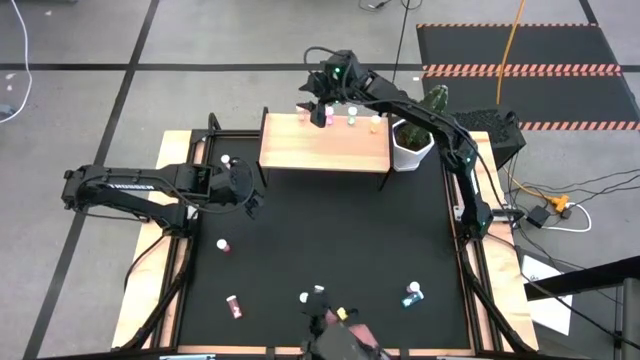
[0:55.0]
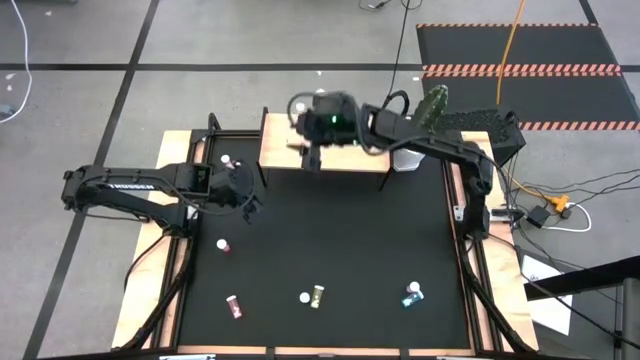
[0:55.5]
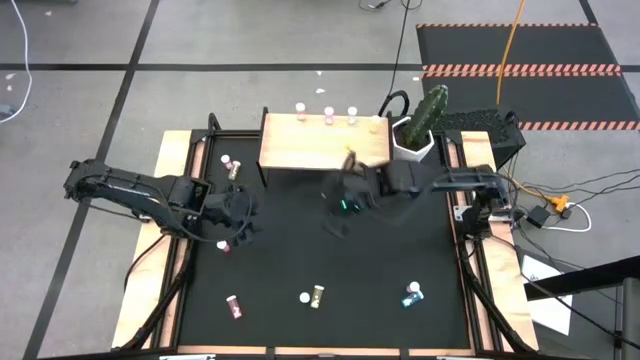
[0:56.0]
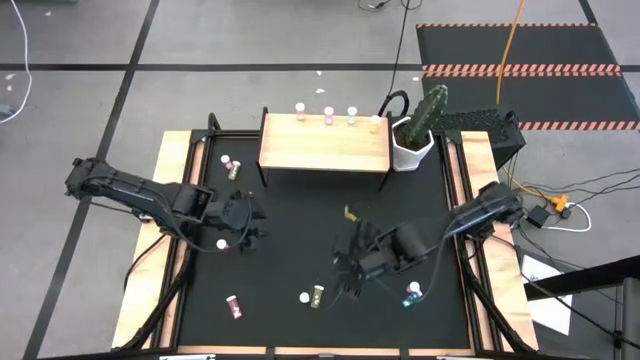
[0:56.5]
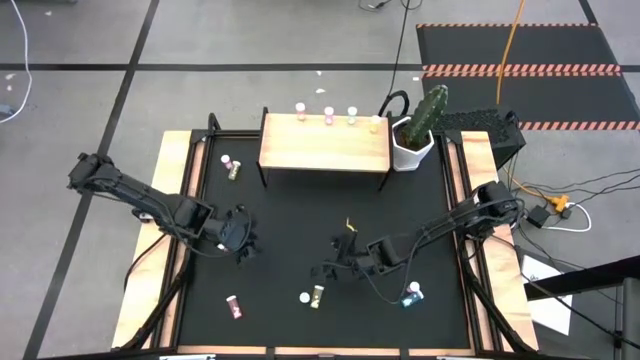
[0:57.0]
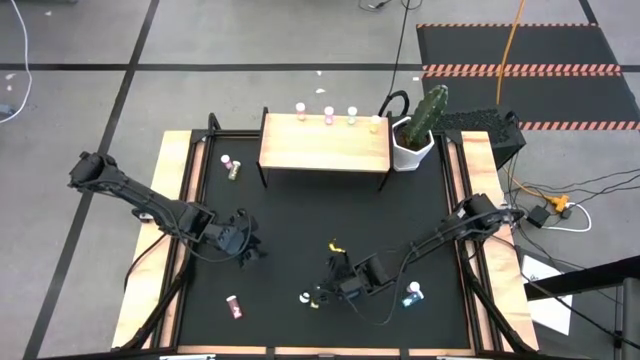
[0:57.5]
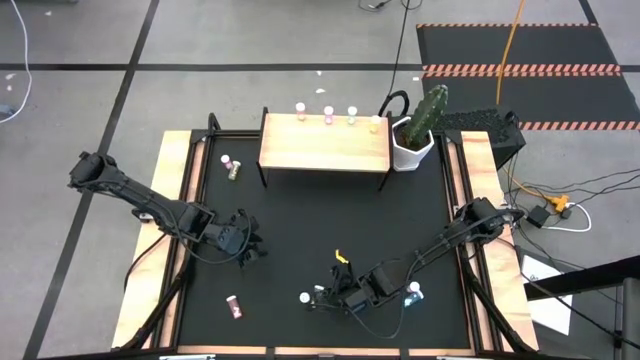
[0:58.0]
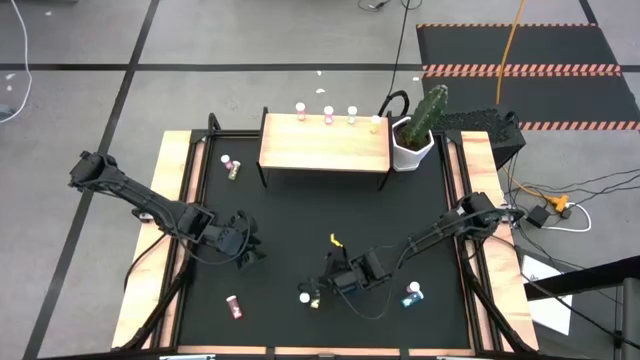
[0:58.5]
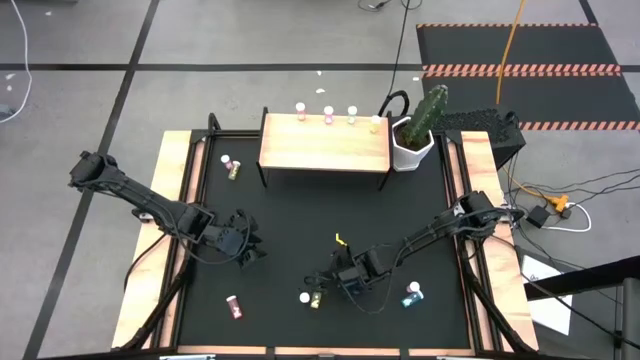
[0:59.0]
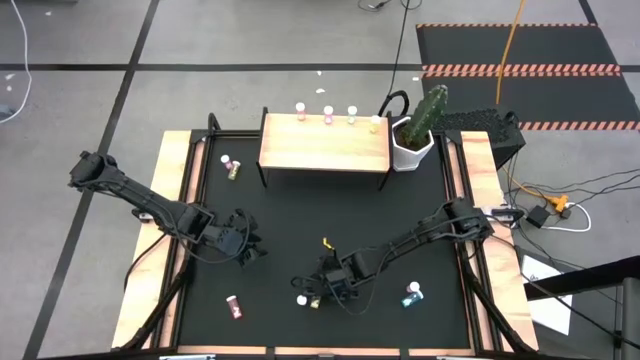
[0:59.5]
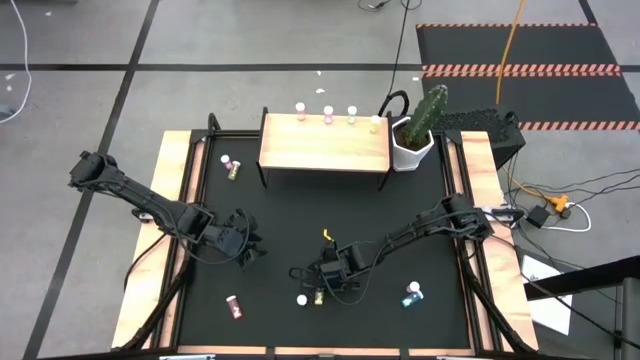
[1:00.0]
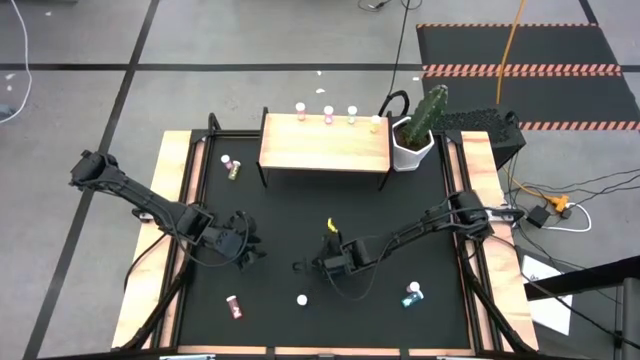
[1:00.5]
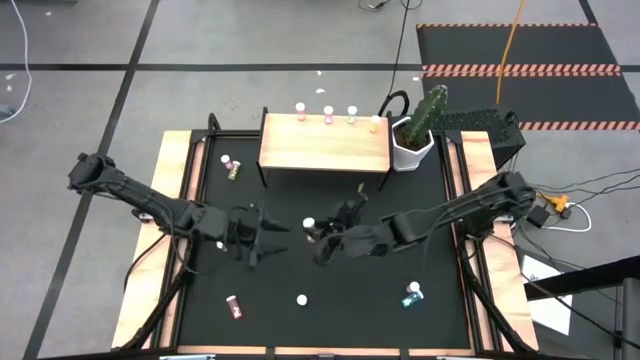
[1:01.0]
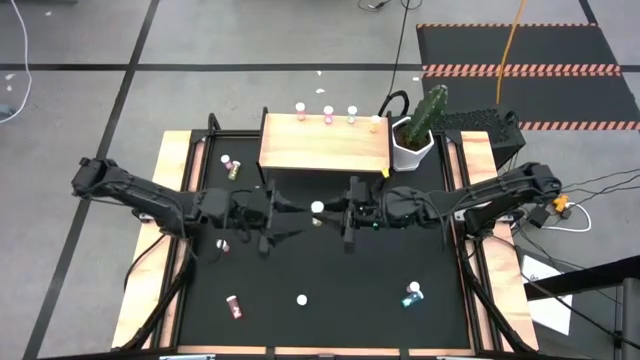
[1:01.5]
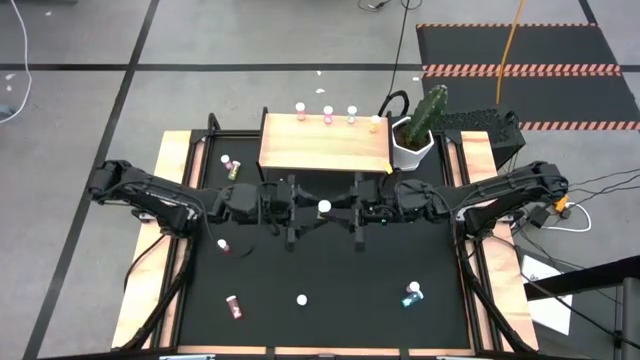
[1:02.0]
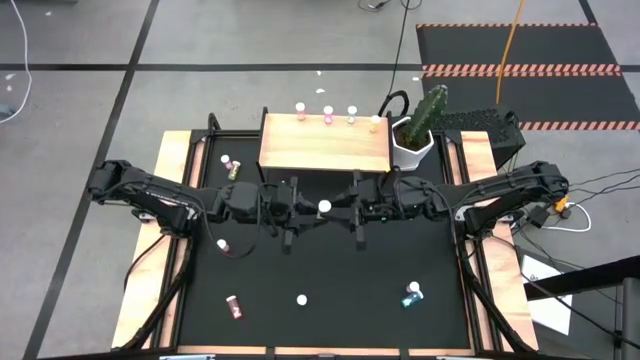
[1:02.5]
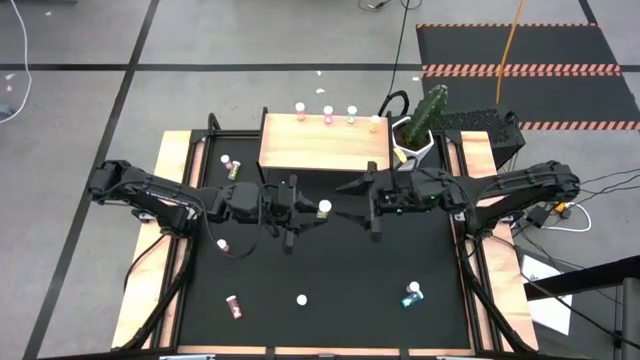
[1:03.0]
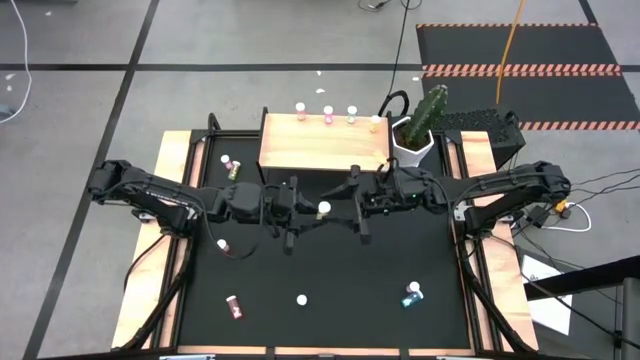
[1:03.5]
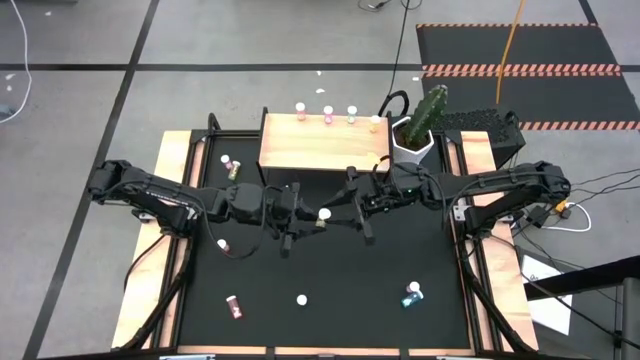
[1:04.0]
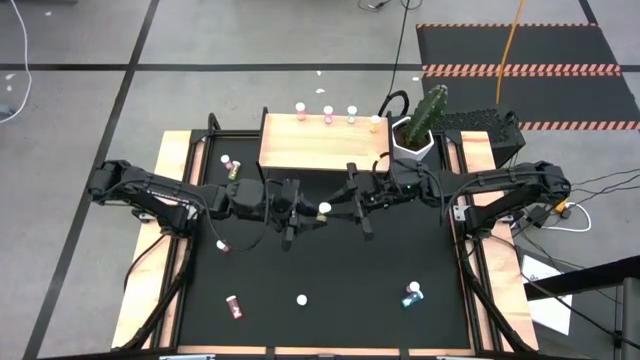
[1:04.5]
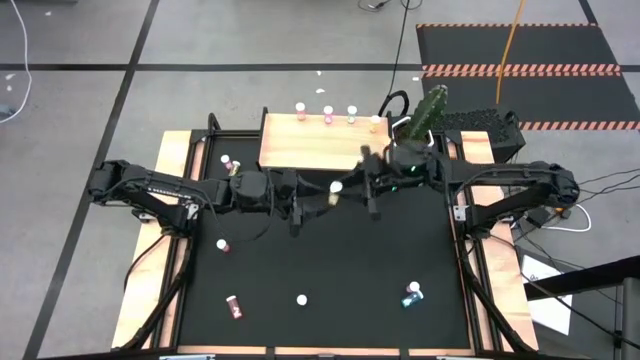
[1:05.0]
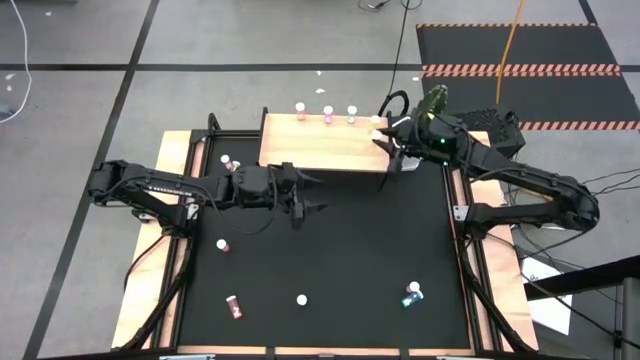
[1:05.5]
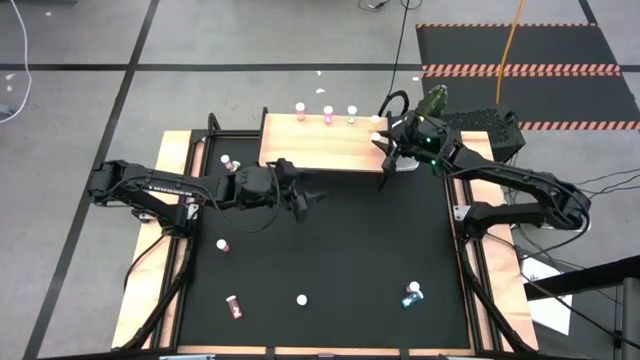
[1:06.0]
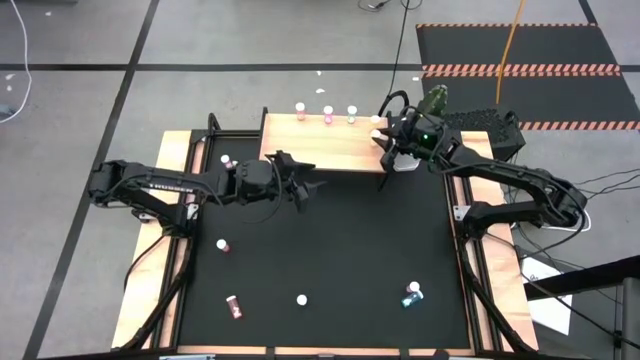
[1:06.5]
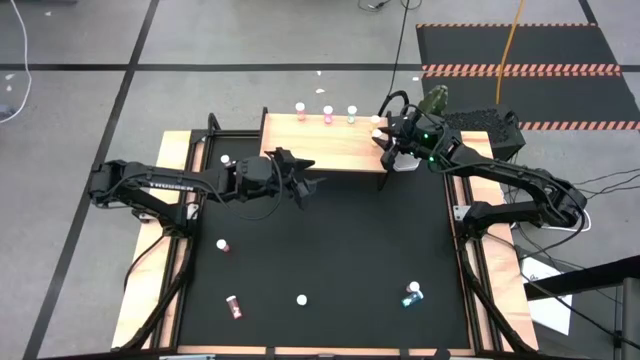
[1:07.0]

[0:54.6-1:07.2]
Task: Pick and place medicine bottles onto shelf by color
Put the bottom yellow pill bottle on the shelf aligned with the other yellow pill bottle
